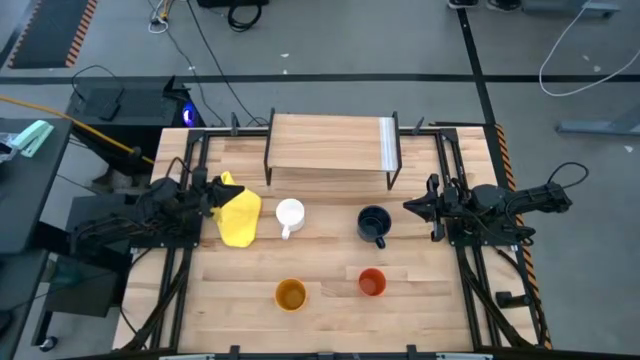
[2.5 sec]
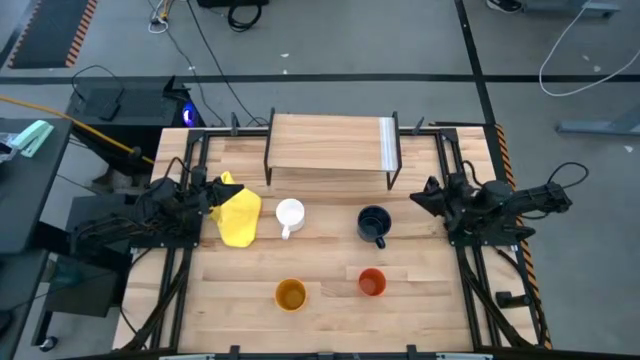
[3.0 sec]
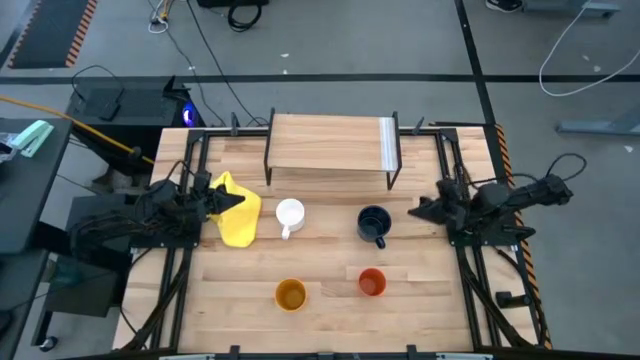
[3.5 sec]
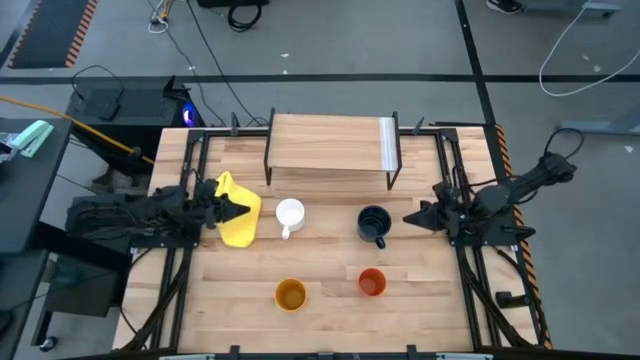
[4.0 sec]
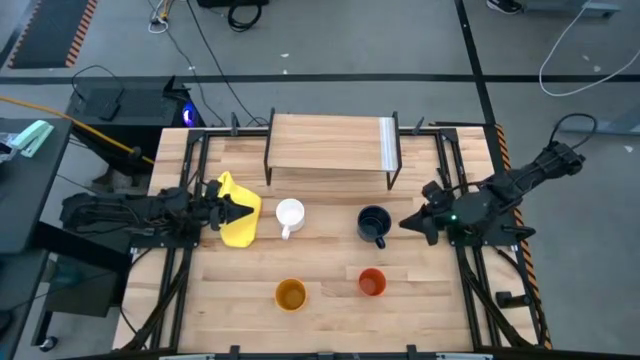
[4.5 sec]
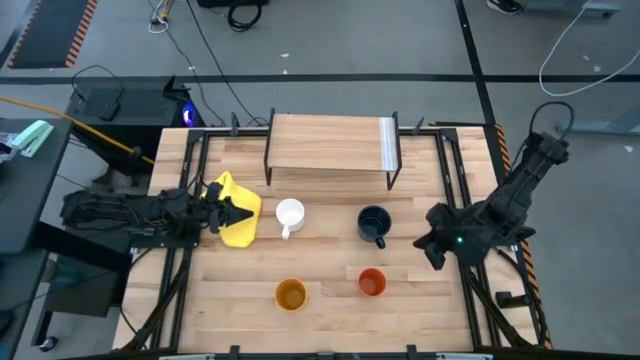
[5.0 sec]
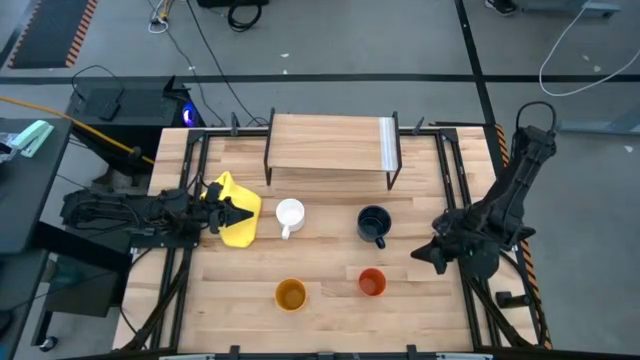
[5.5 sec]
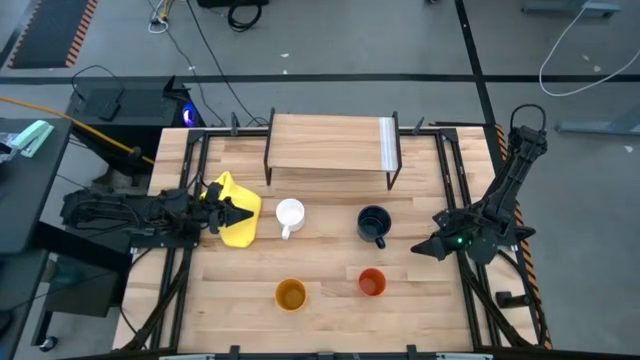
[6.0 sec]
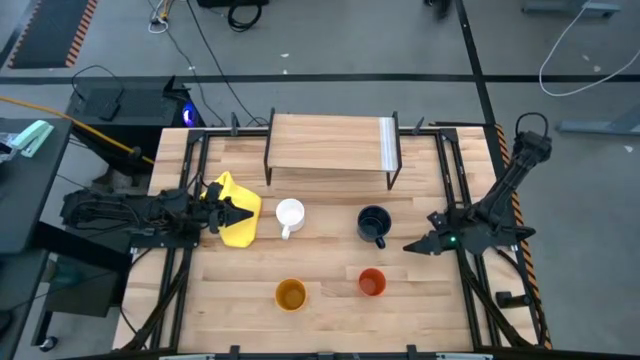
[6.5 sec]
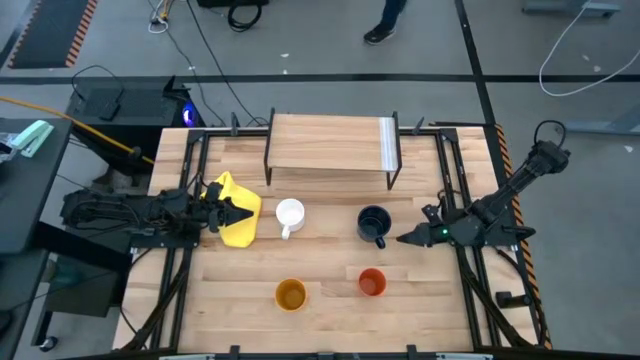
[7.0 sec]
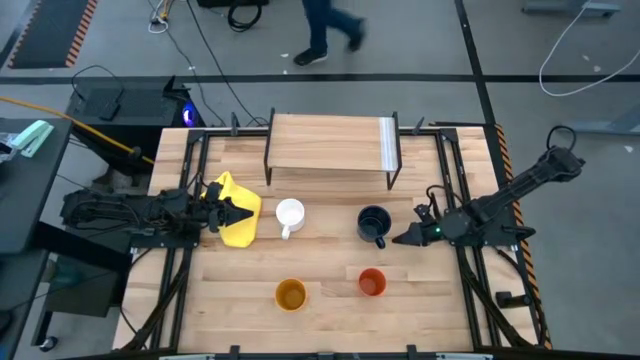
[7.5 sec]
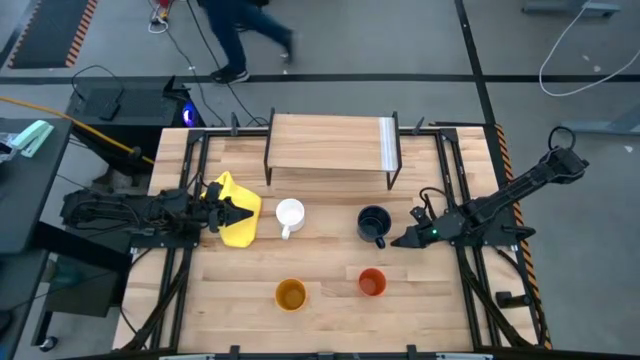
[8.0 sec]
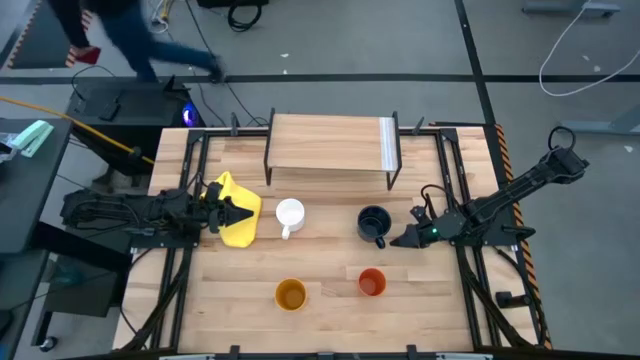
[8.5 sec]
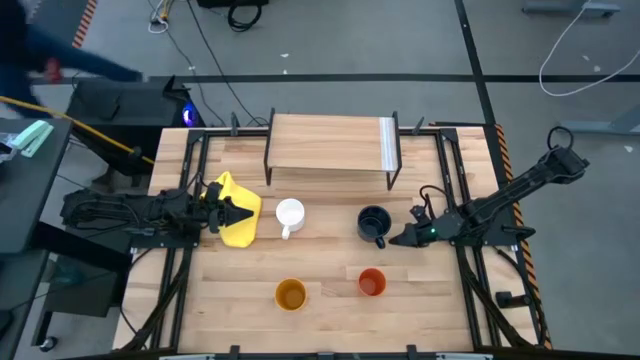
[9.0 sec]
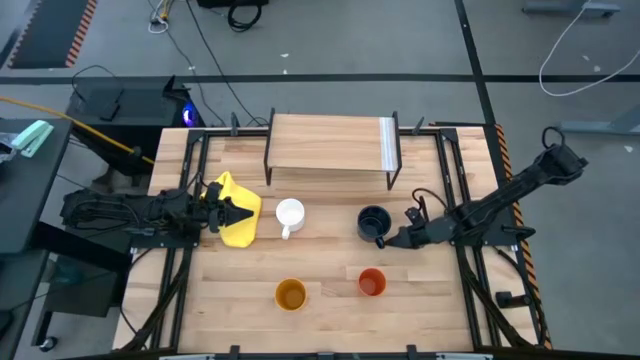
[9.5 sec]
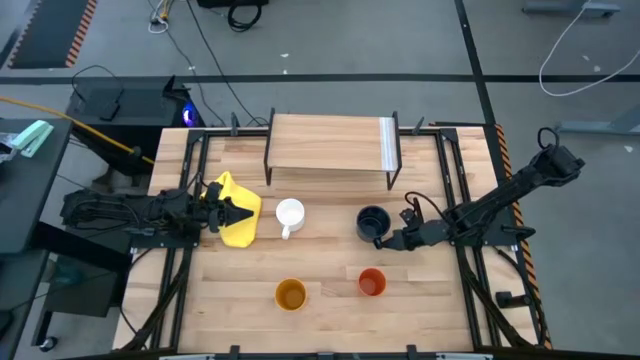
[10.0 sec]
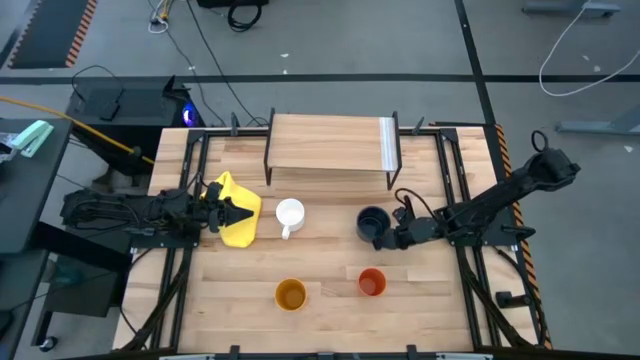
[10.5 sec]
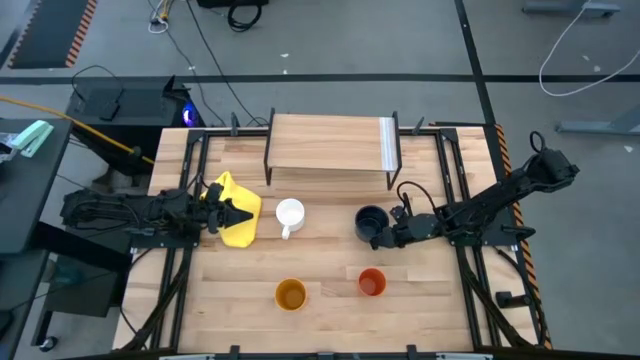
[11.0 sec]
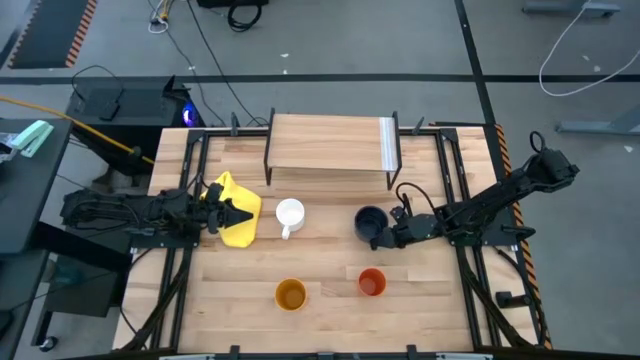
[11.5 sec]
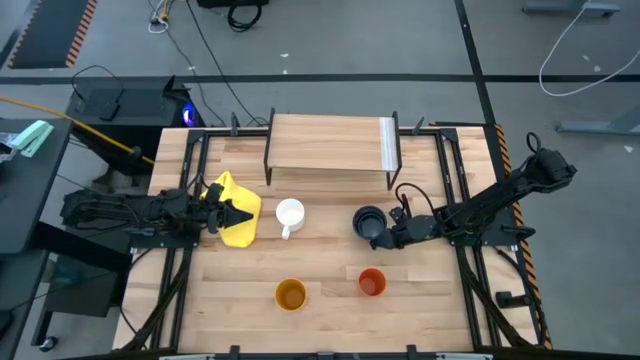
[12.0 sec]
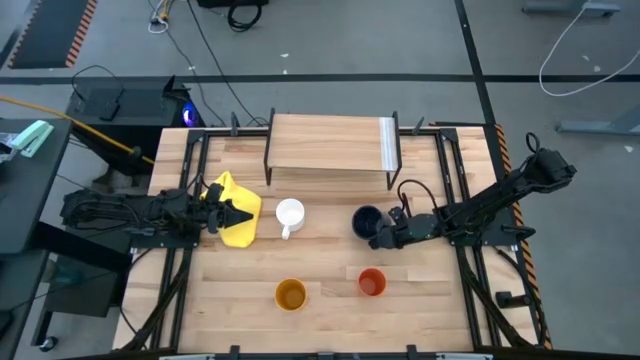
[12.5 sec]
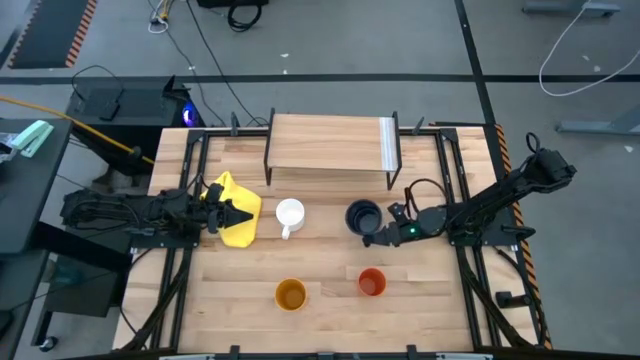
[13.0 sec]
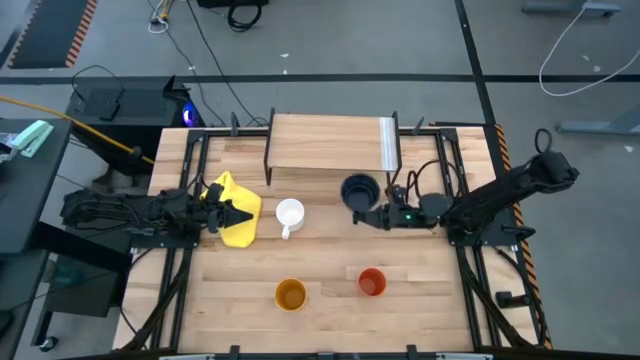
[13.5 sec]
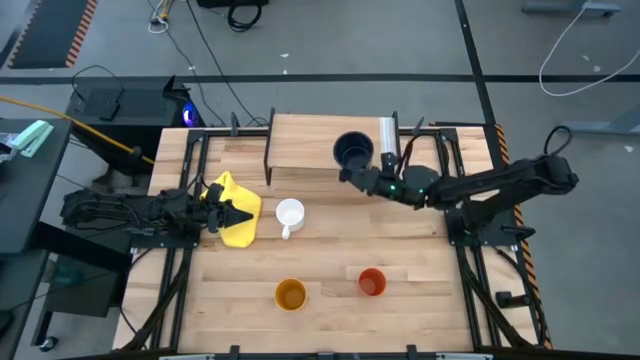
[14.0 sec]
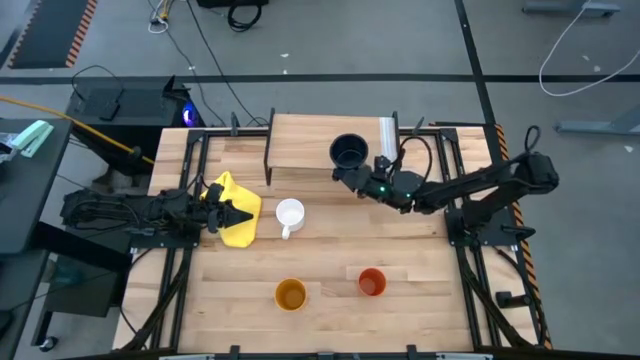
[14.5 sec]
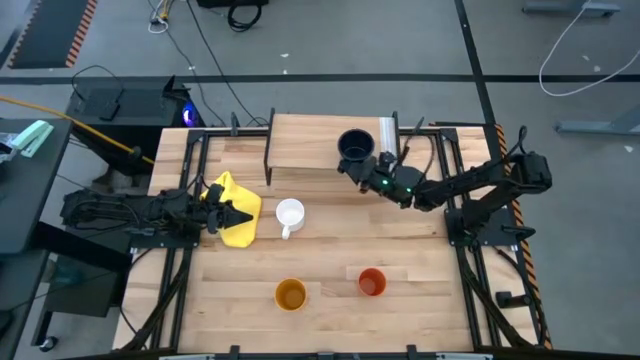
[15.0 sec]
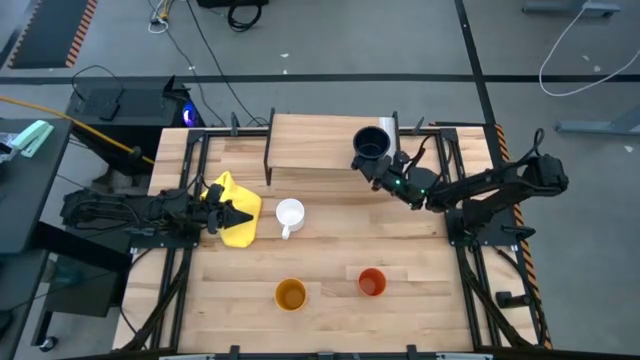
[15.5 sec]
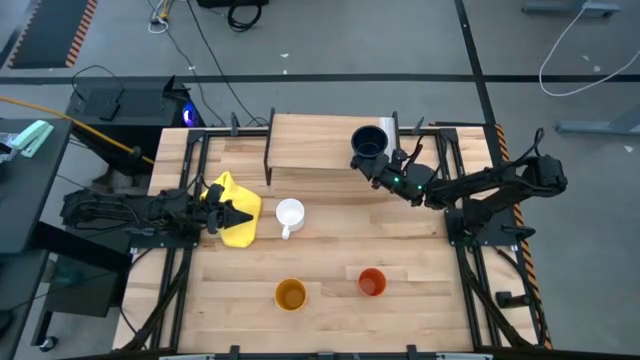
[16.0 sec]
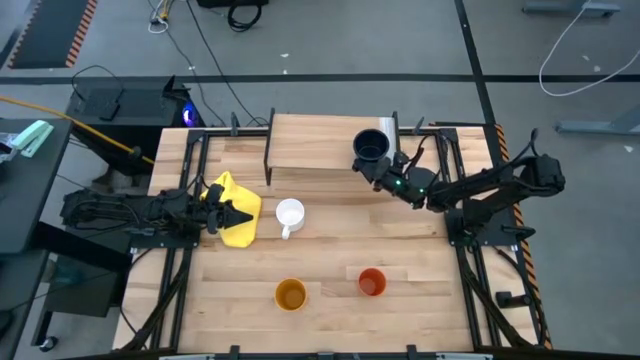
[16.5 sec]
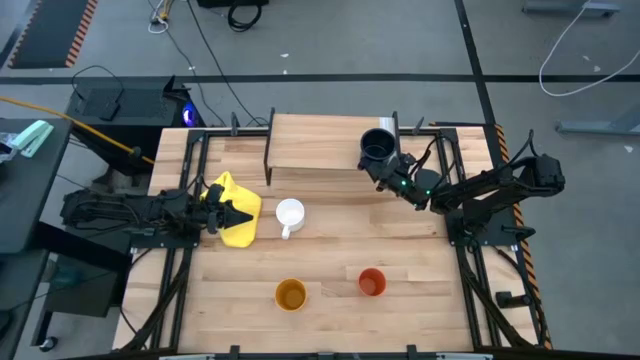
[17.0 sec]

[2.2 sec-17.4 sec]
Task: Stack small to large cups/mugs on shelf
Put the black mug on the shelf
